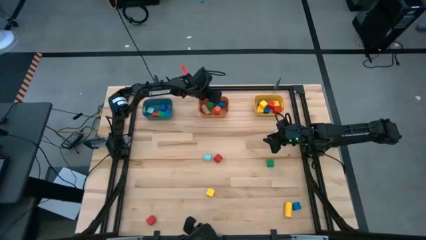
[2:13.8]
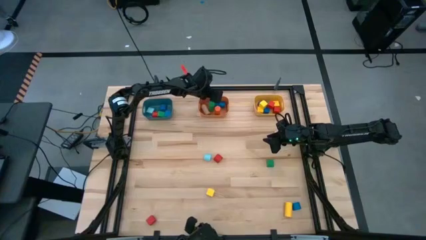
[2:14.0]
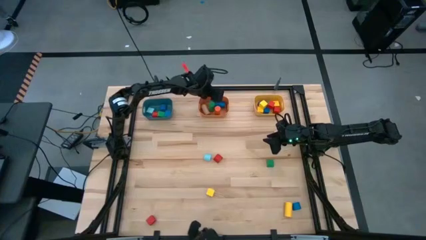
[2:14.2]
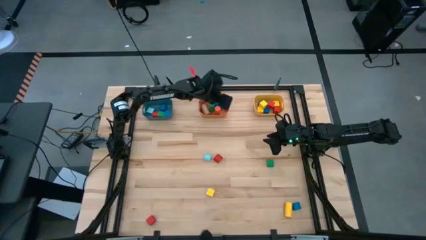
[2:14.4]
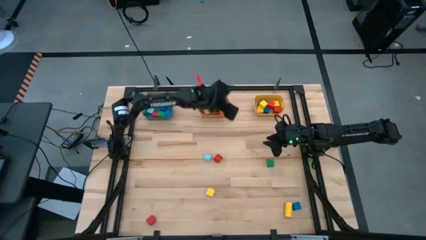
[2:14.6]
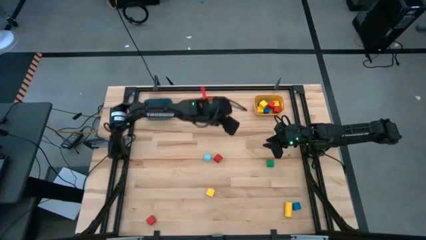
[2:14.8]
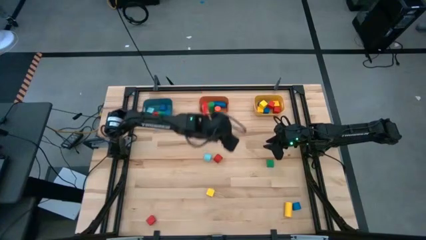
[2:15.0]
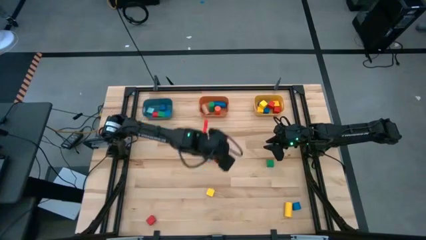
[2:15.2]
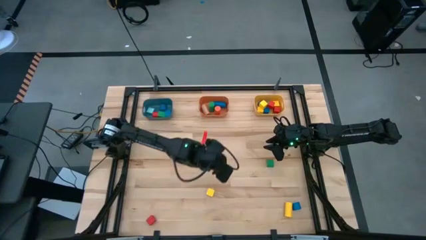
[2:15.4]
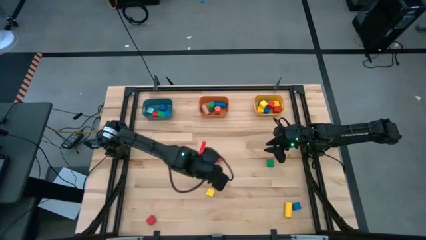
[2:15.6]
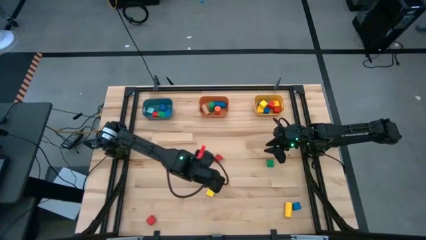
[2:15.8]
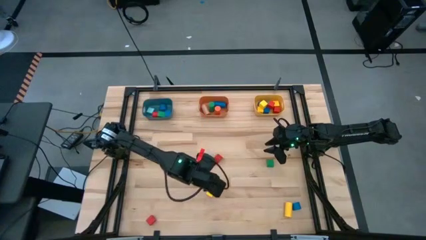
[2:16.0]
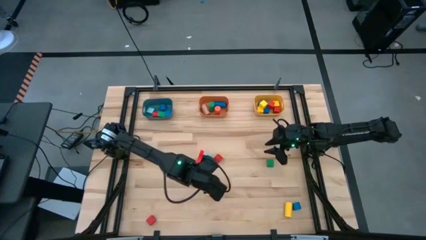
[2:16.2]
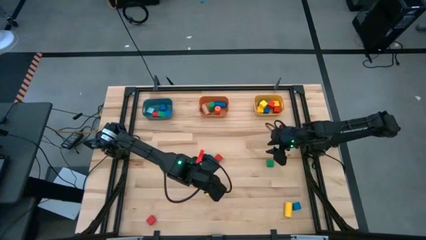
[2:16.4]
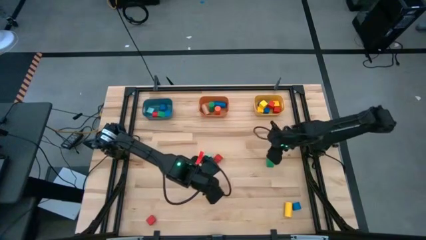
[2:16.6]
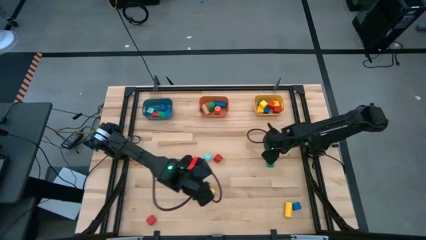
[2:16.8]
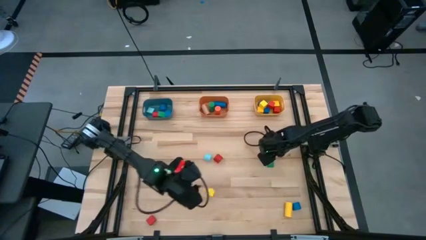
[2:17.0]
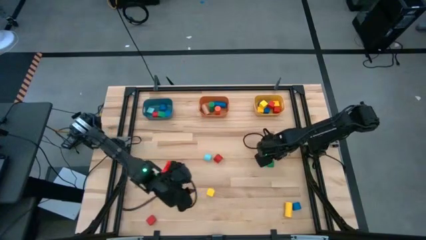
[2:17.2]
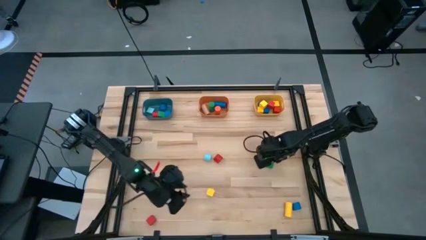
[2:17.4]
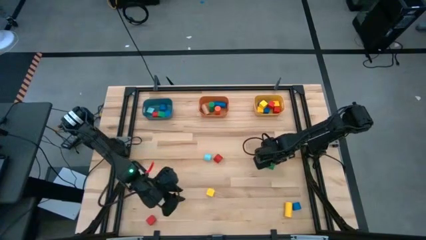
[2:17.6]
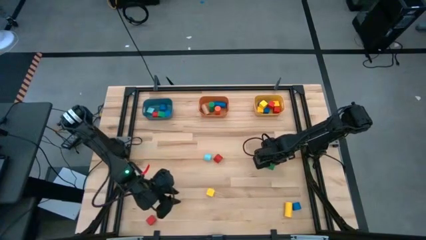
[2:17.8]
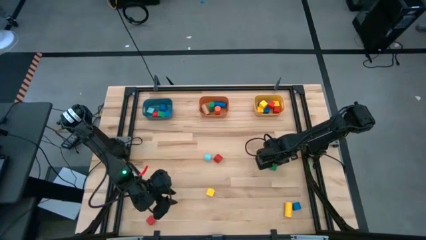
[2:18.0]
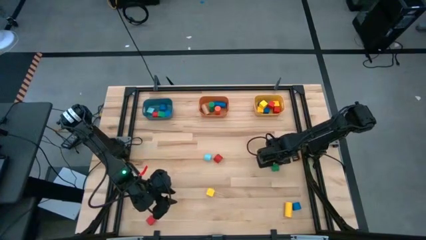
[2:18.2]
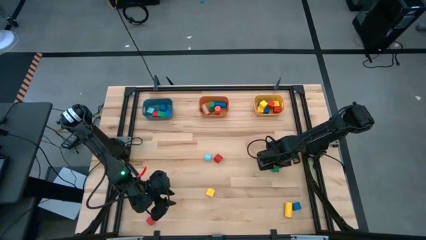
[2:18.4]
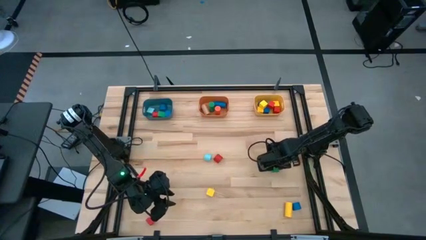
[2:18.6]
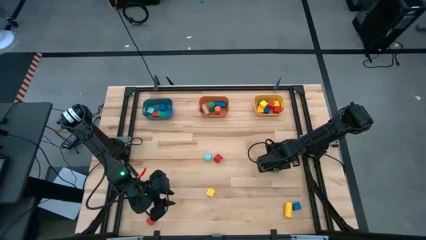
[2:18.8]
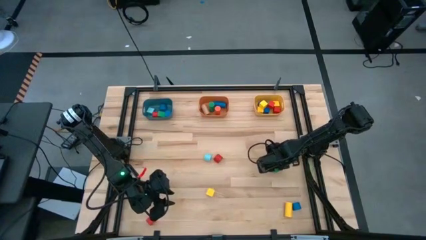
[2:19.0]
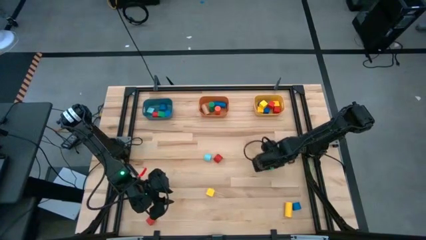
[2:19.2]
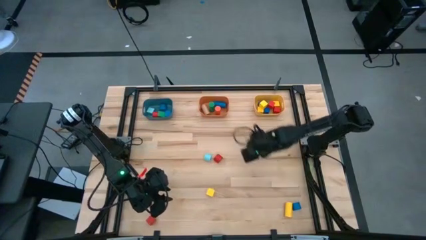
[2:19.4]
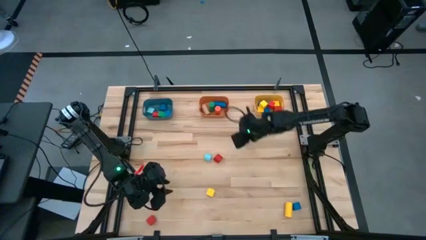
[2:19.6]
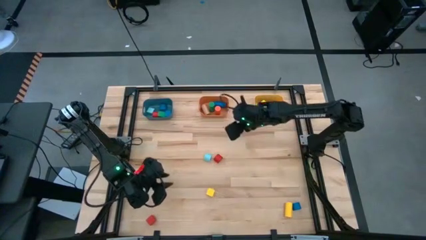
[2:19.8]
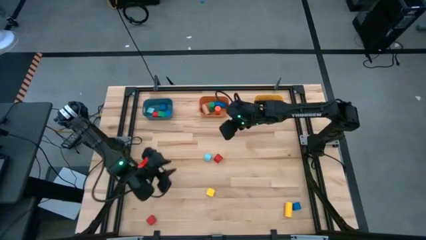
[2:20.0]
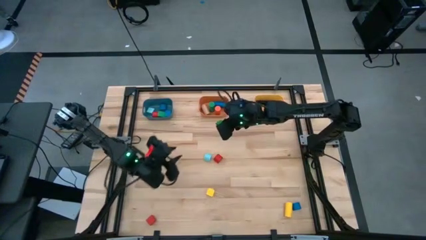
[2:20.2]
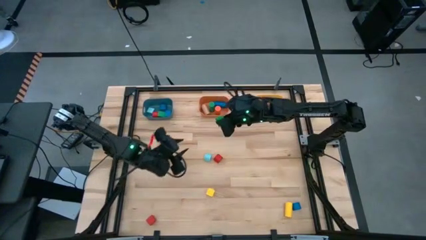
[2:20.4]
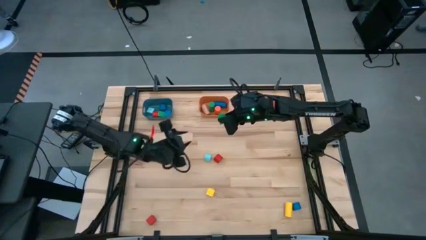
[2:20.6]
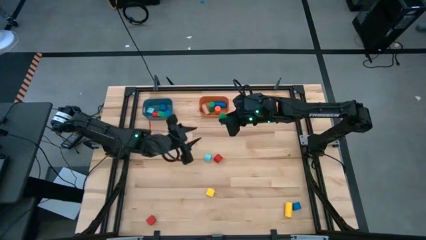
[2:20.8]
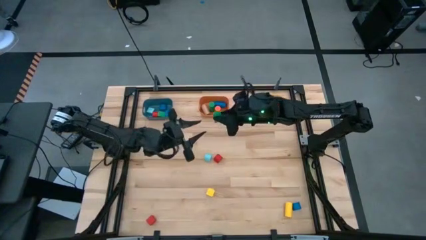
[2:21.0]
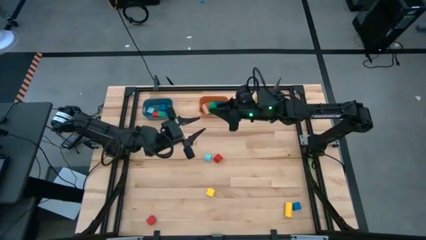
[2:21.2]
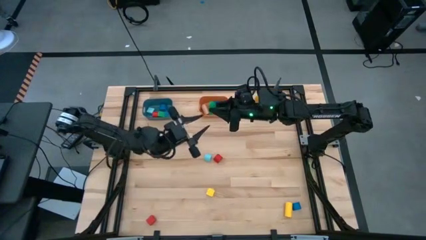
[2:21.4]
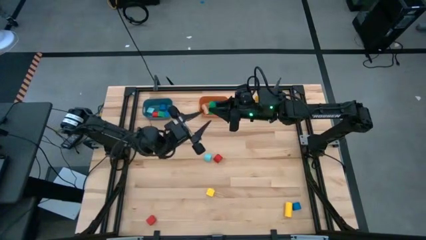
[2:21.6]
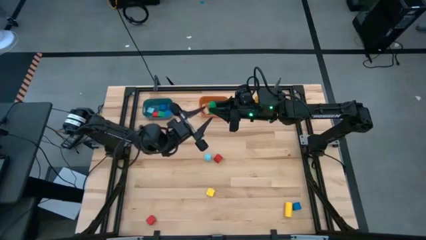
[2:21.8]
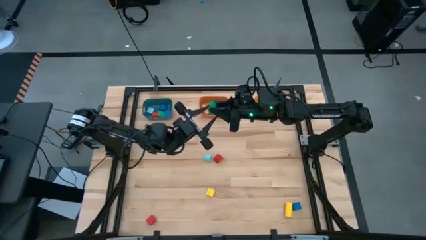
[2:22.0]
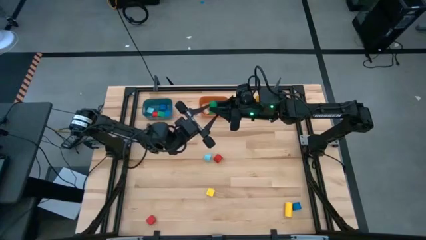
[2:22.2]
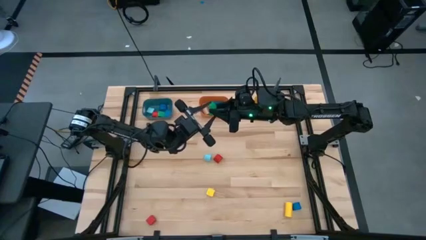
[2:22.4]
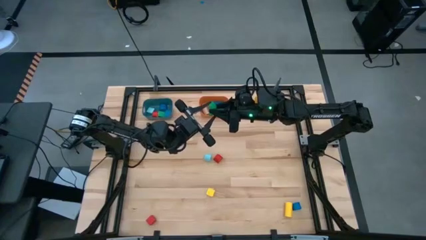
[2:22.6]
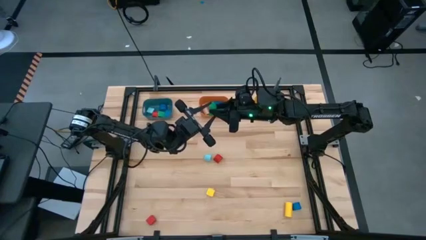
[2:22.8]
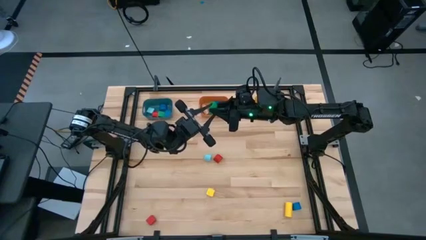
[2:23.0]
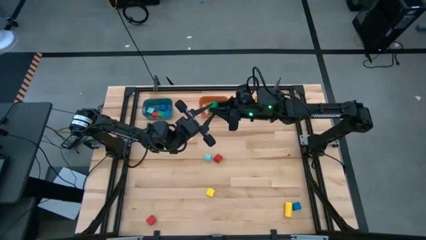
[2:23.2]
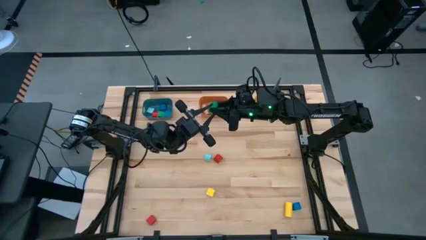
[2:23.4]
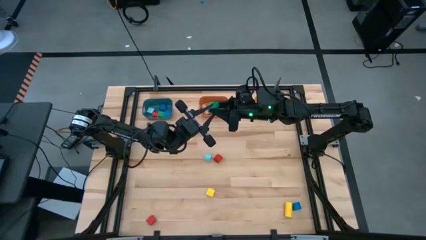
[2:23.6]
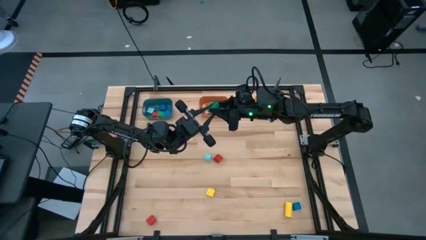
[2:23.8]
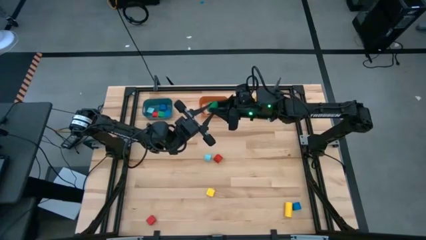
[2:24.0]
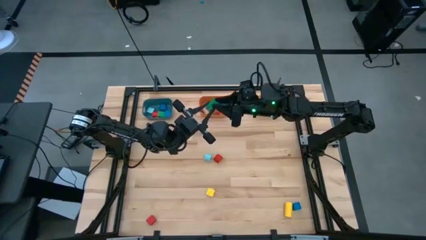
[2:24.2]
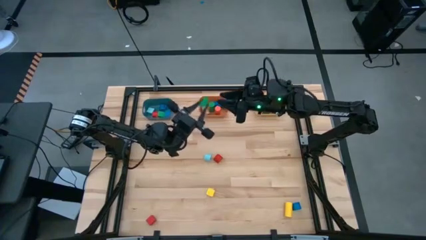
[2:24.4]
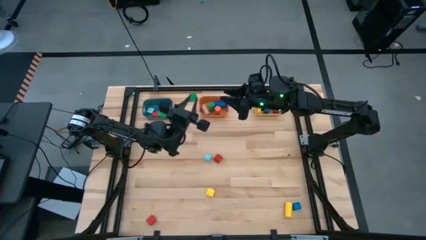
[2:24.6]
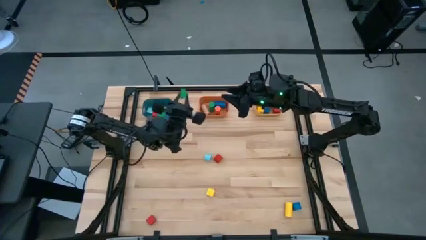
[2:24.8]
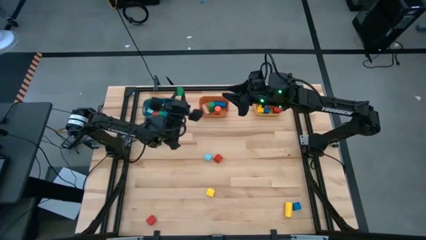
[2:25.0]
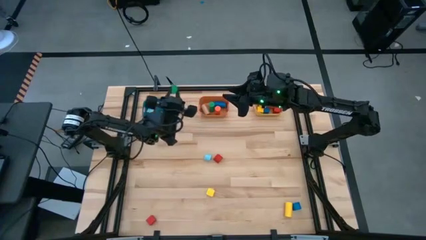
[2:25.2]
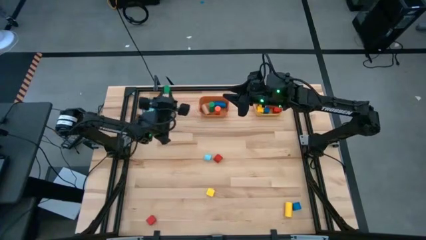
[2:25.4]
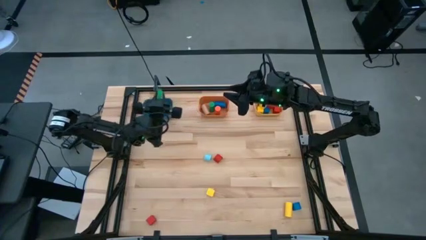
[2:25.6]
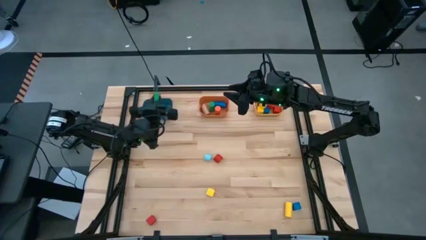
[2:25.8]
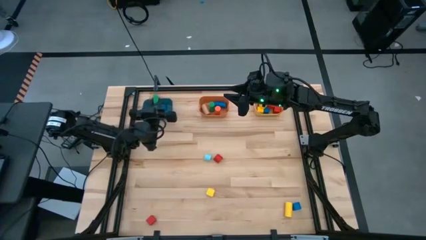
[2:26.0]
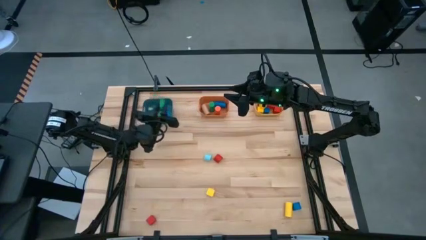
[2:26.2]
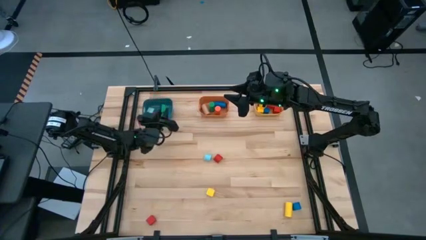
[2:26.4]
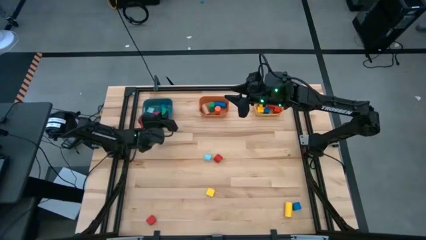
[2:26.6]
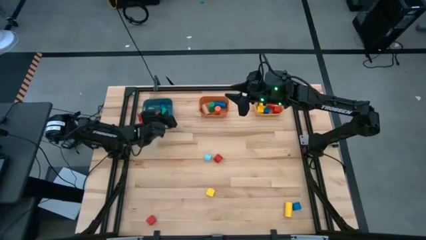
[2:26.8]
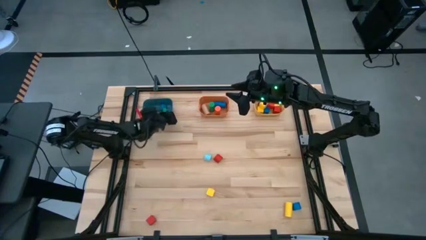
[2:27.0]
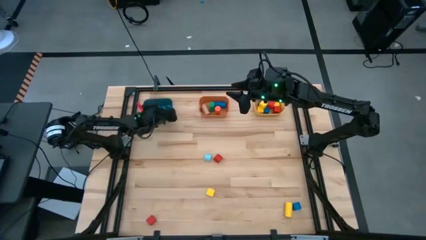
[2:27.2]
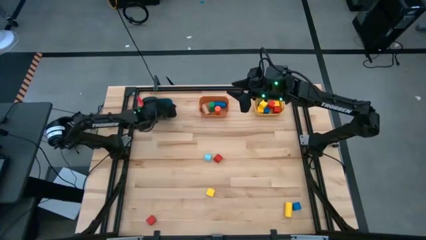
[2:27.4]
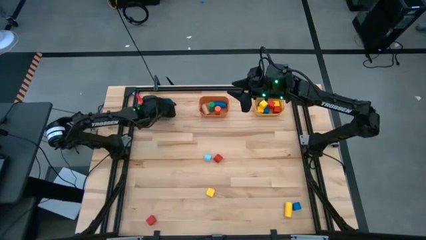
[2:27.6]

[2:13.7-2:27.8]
Task: Sort blocks by size
Put the green half-circle block into the blue bin

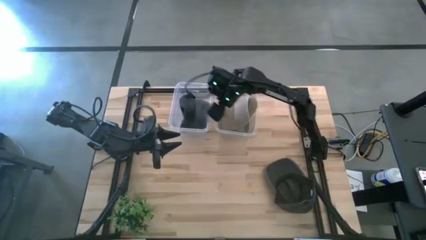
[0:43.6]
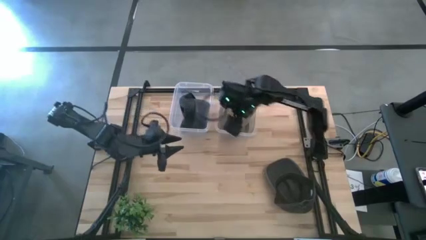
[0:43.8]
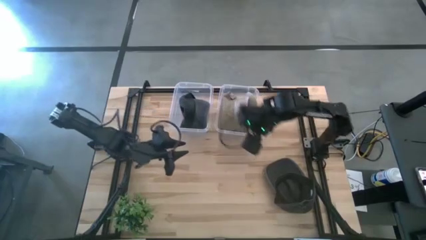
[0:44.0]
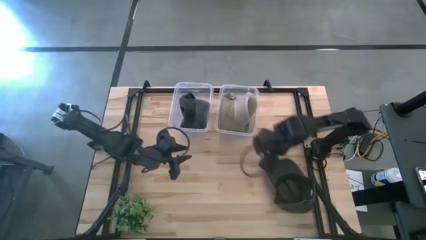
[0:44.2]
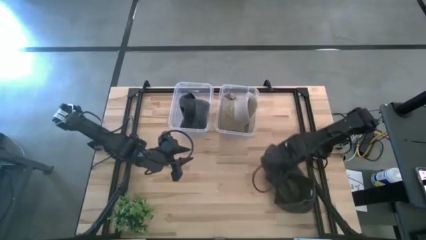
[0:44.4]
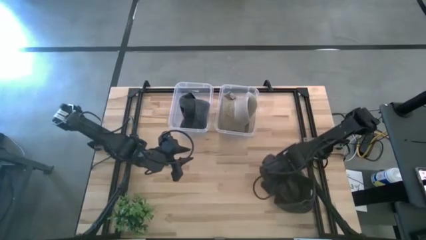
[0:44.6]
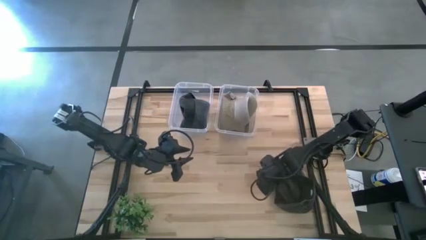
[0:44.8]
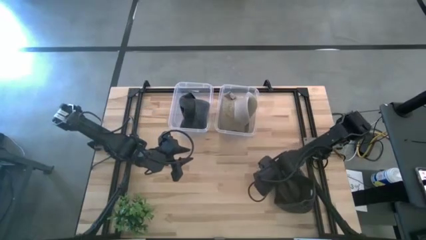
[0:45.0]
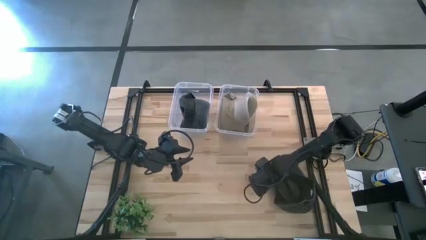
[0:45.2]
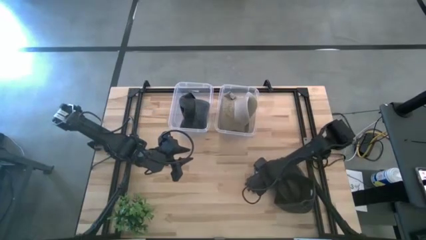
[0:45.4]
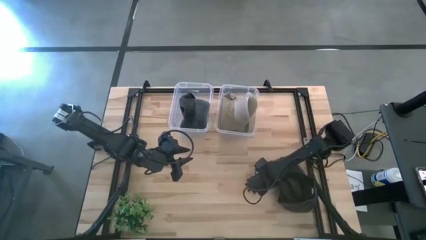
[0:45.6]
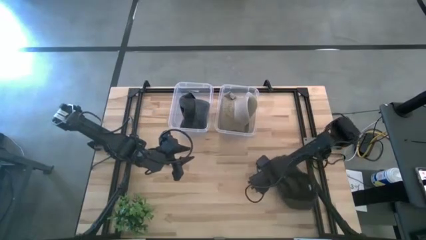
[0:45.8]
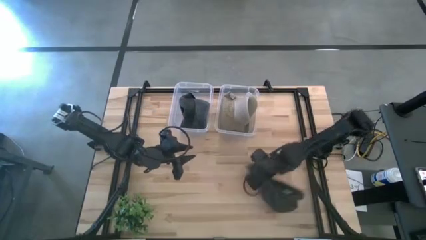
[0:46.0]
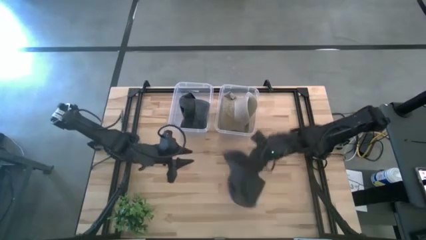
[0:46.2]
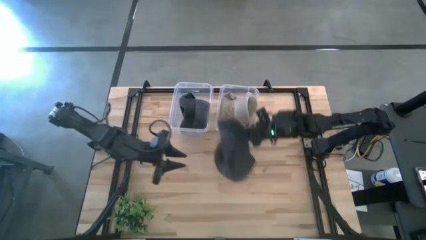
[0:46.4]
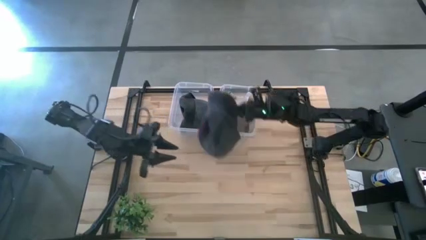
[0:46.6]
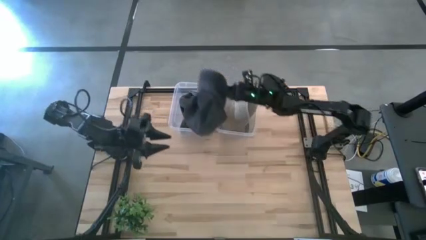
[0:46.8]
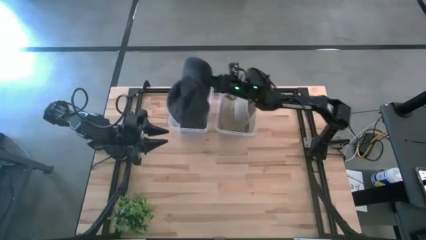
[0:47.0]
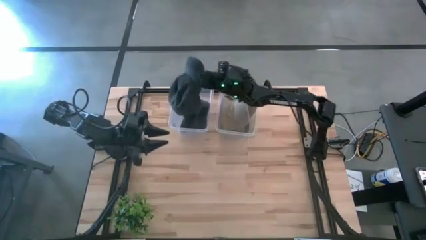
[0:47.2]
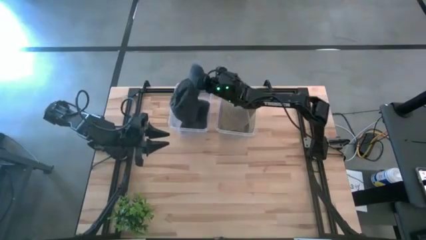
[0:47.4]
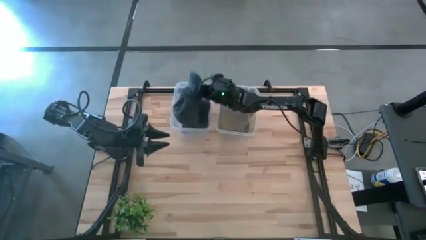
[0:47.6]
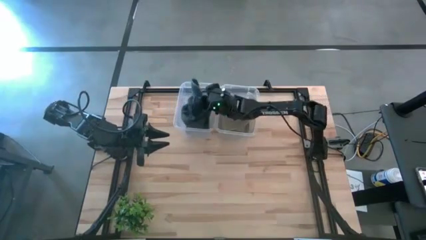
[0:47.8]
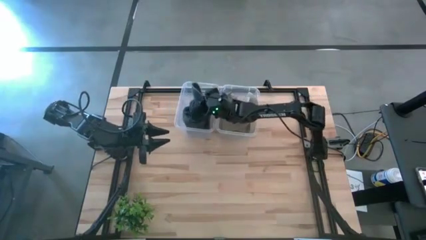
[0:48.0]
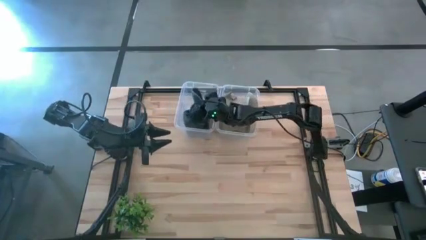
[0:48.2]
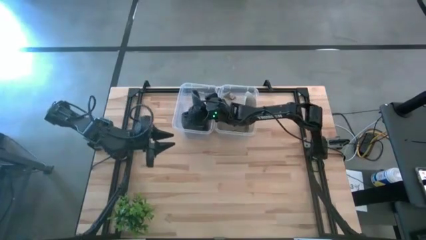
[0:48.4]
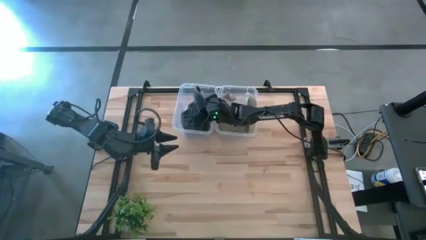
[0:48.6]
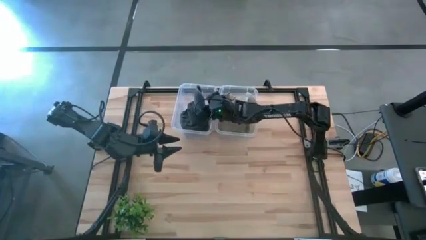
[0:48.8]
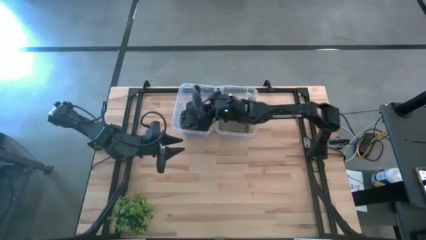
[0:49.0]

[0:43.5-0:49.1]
Task: Pick & Place hat
Put the dark green cap into the left transparent bin
